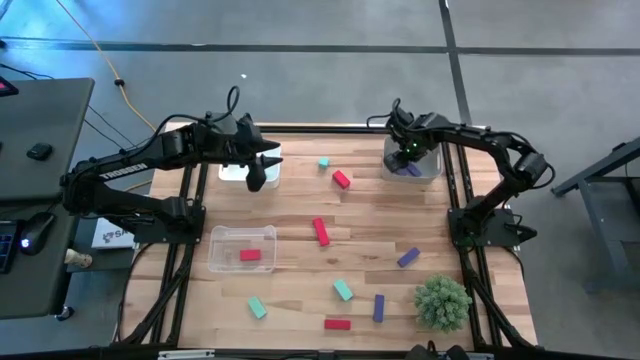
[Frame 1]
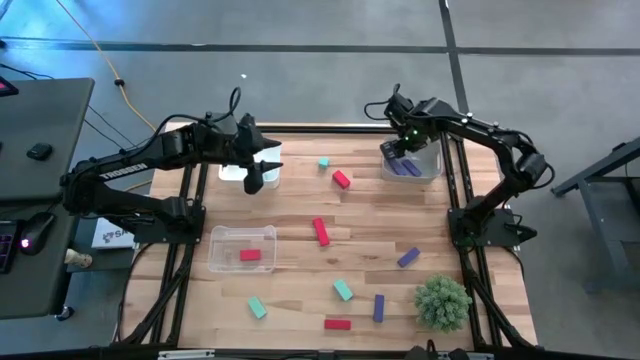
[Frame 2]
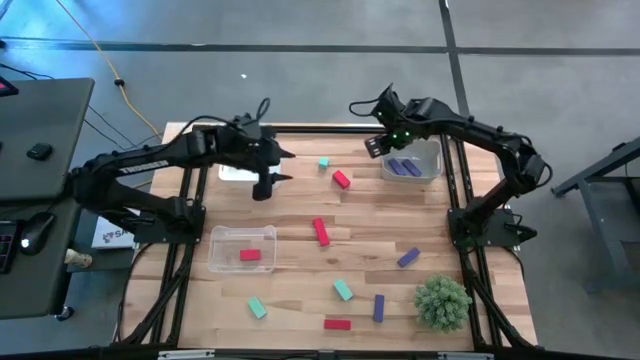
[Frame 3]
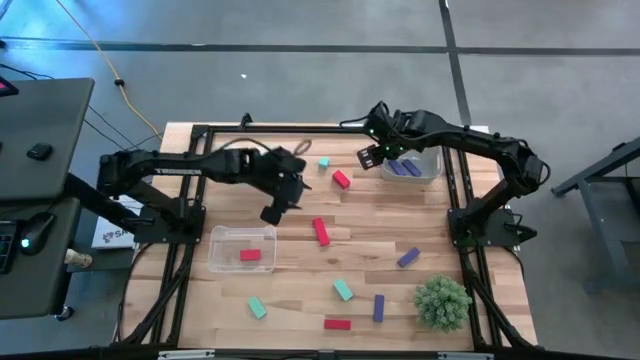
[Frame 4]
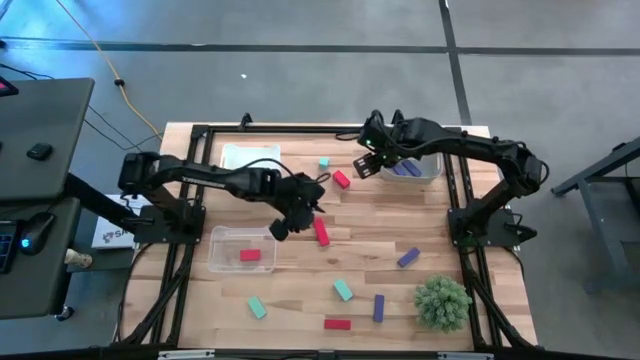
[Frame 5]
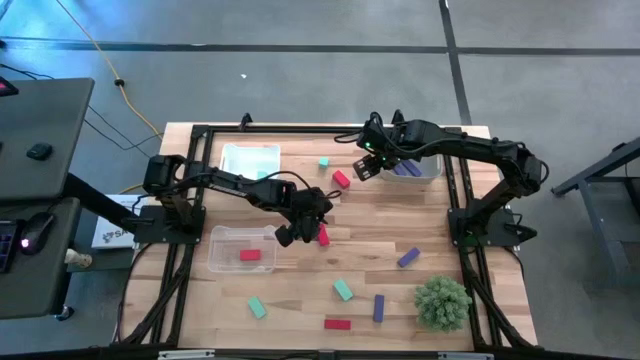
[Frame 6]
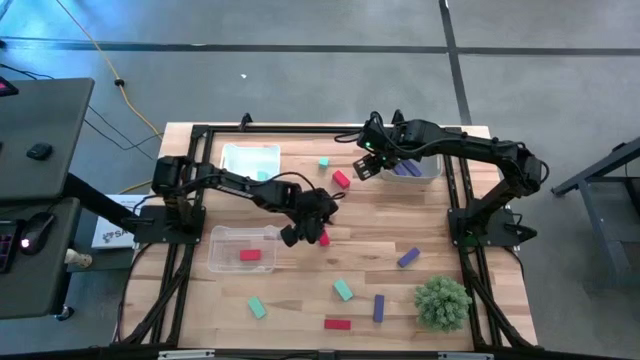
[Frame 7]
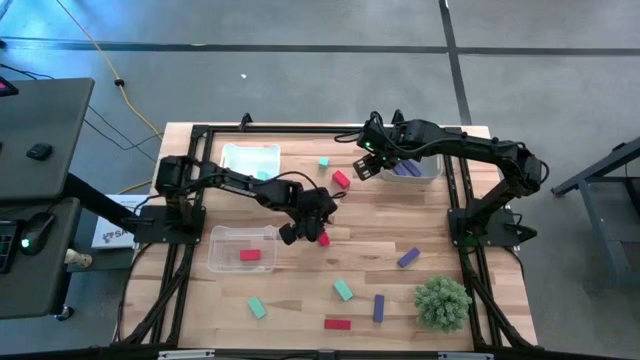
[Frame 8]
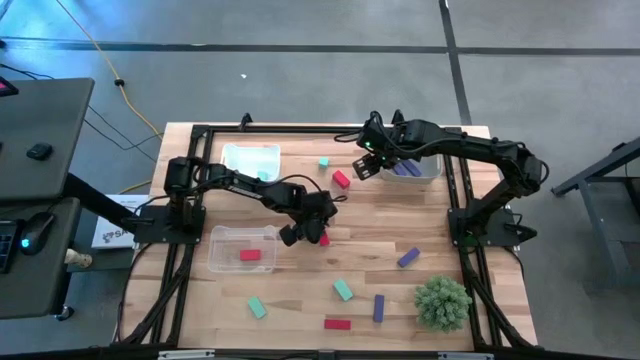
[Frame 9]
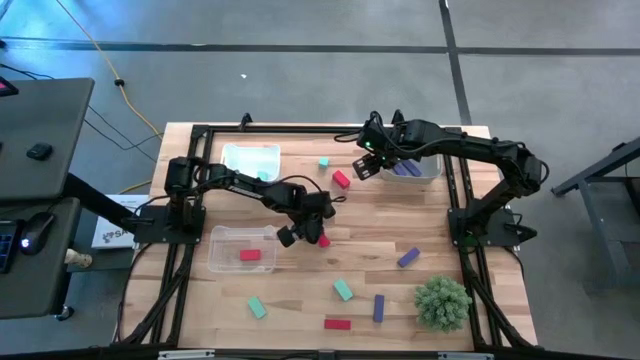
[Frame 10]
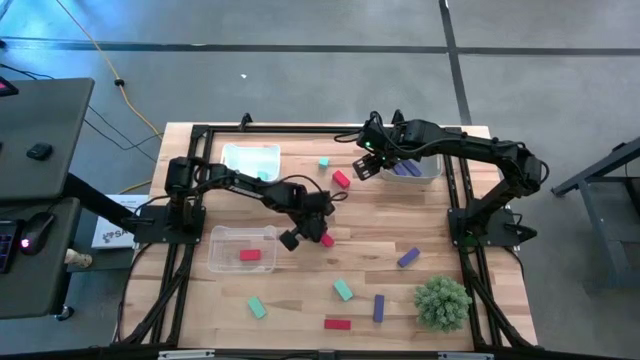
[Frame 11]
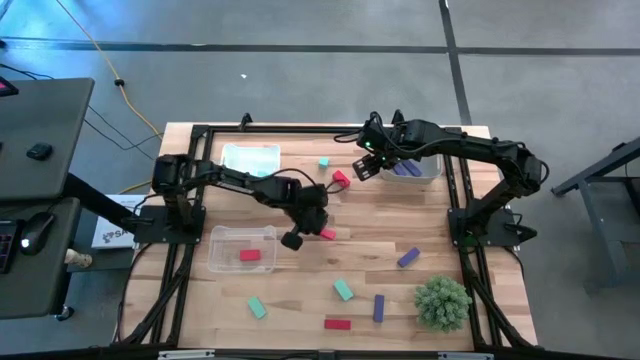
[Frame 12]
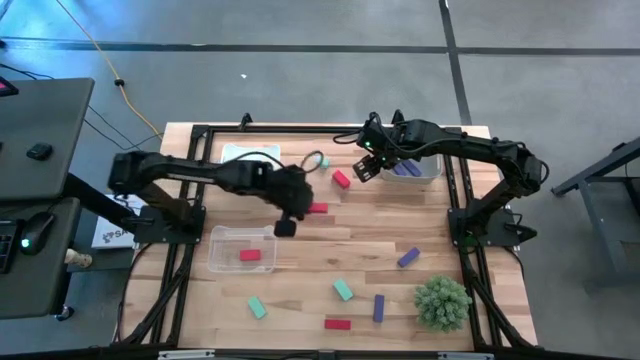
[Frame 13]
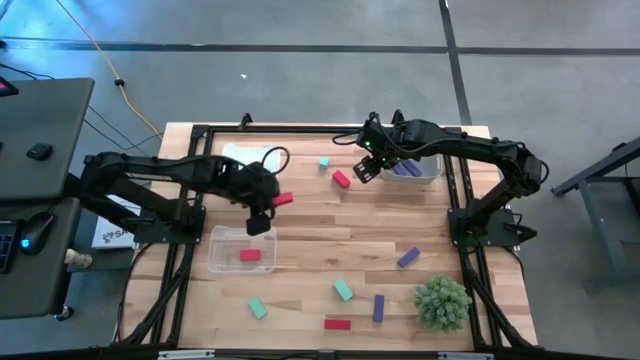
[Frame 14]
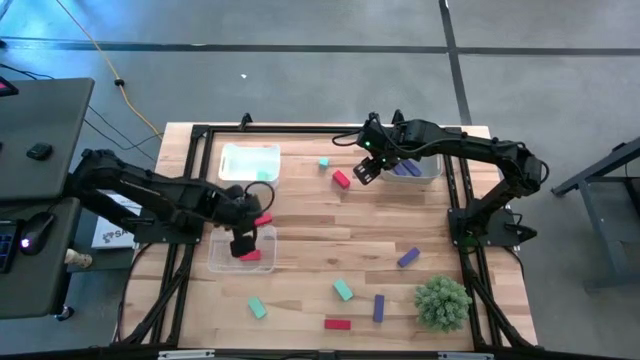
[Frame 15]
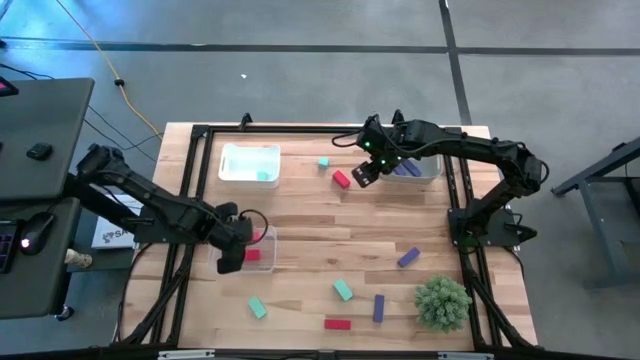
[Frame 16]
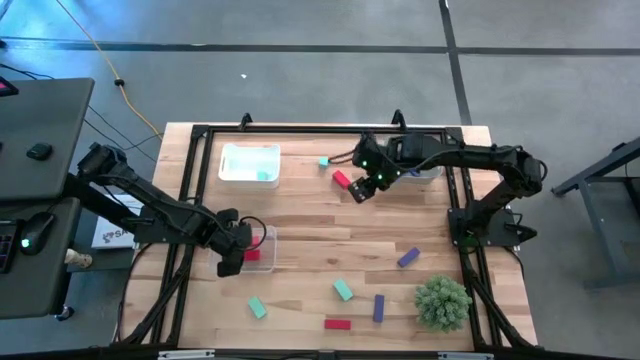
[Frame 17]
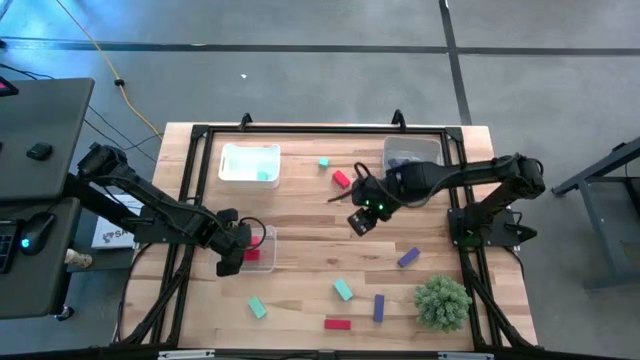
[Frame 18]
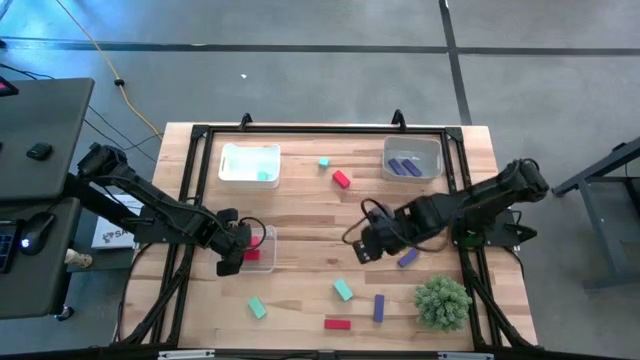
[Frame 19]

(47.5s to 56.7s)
Task: Sort & place blocks by color
Put the center red block into the transparent bin

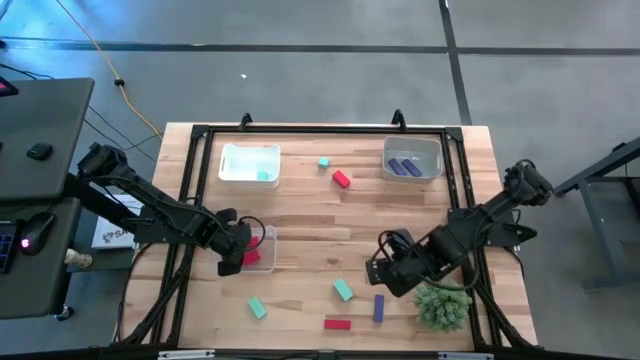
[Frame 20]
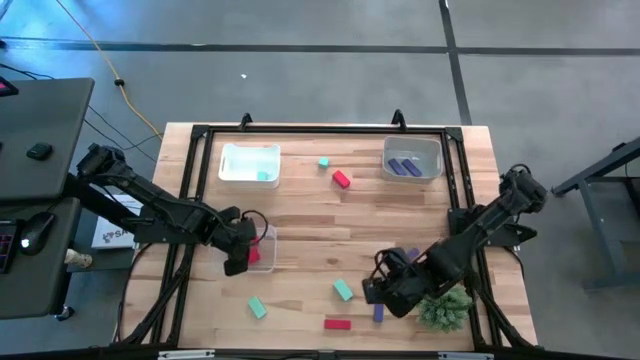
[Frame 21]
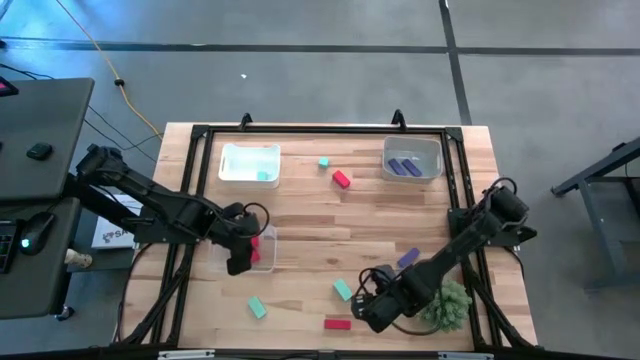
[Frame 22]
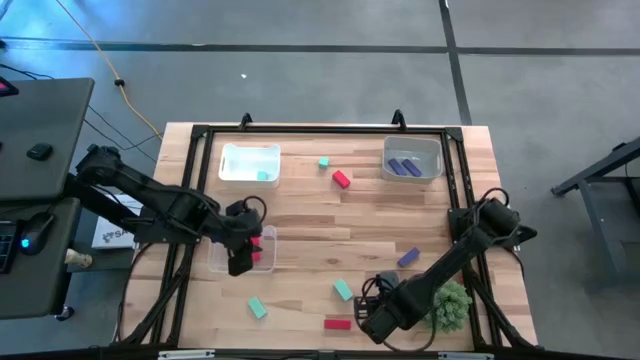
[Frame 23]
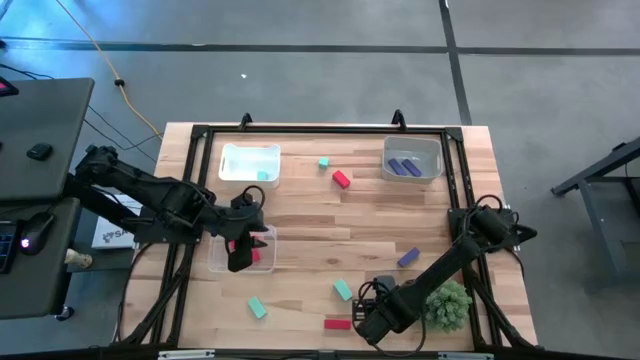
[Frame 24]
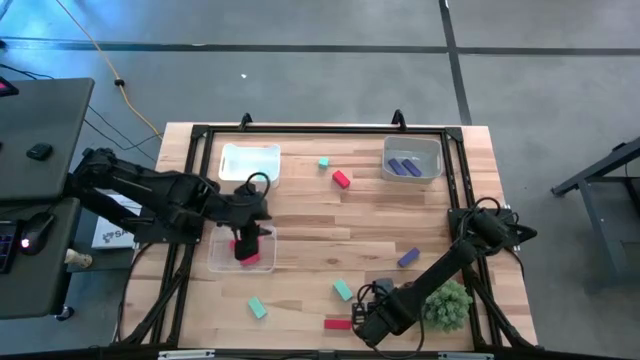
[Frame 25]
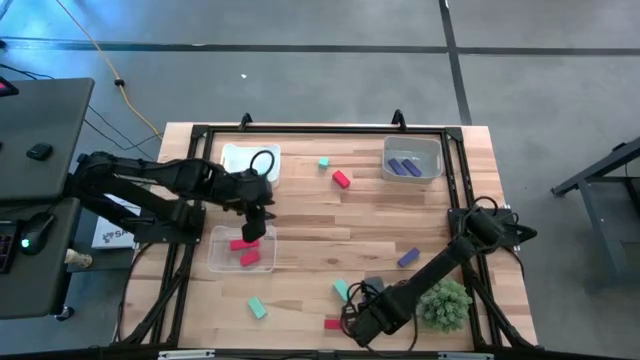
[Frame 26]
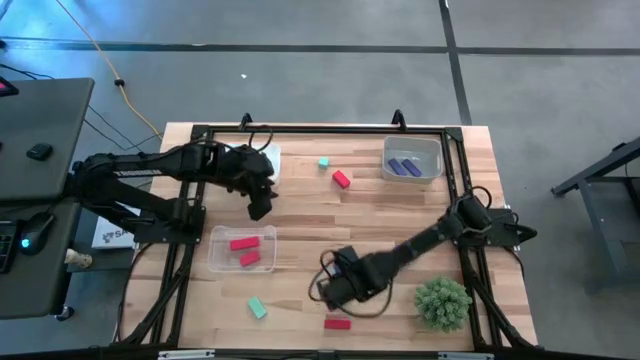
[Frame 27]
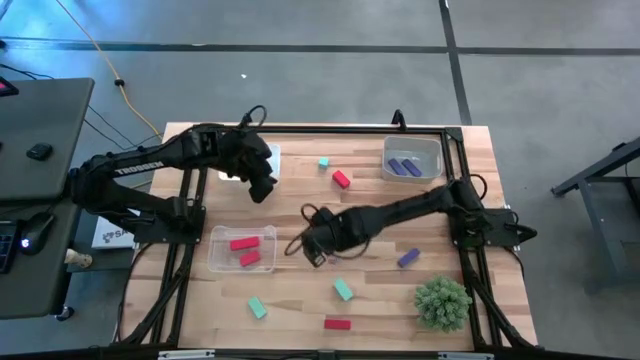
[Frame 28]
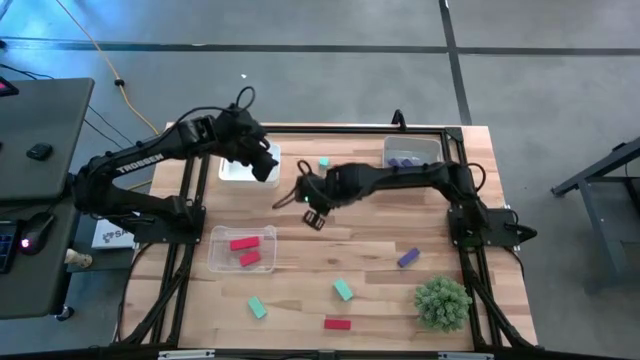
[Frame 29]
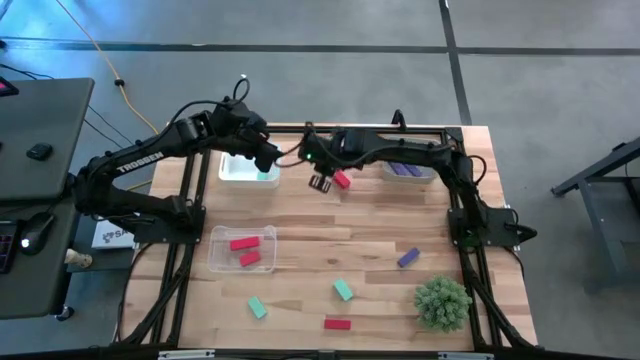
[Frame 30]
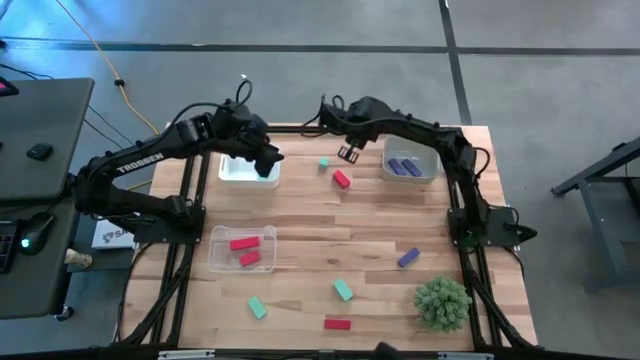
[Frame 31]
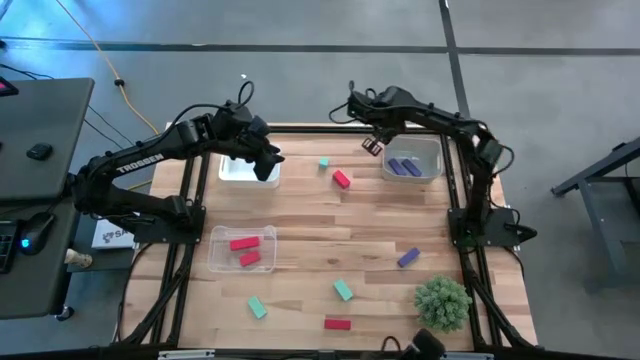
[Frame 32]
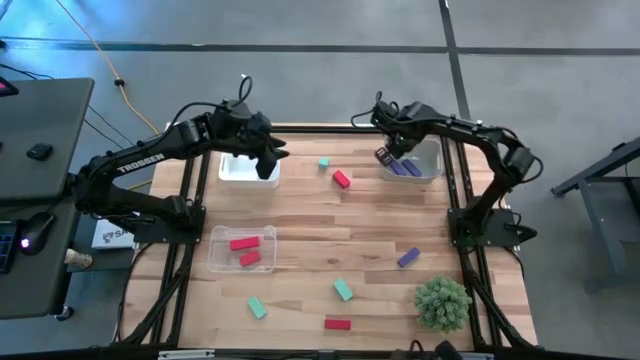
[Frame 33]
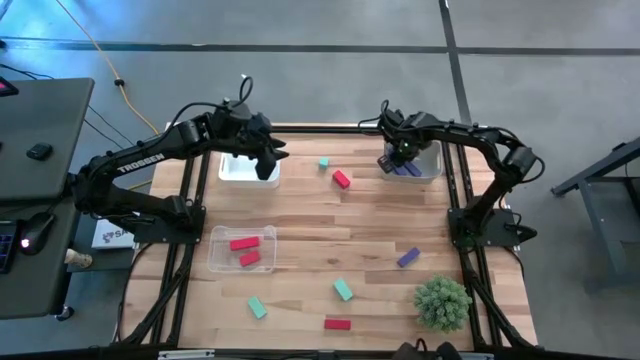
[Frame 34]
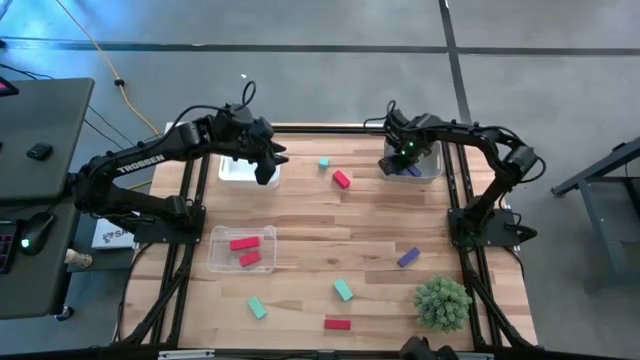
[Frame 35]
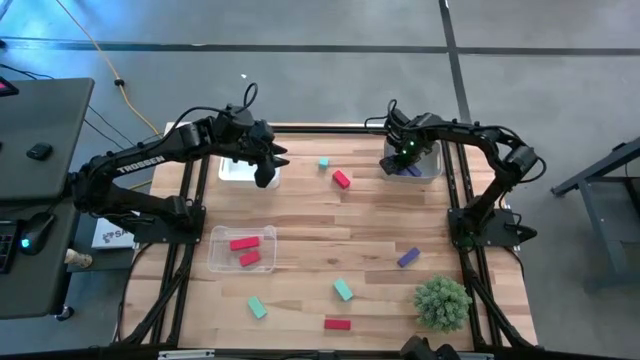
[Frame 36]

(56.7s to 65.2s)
Put the bottom violet block into the gray bin

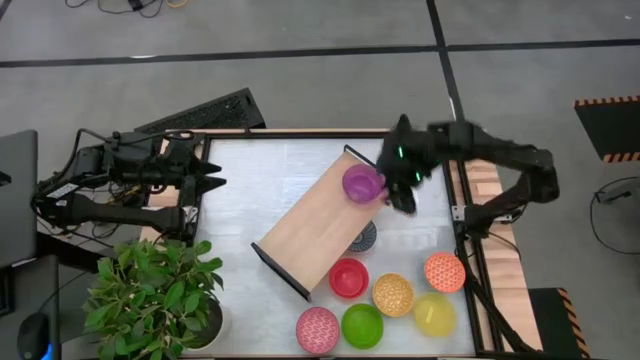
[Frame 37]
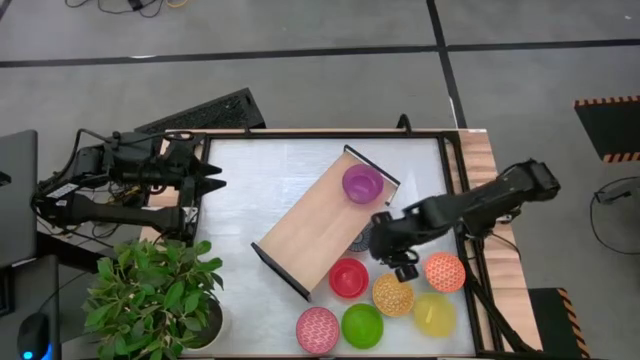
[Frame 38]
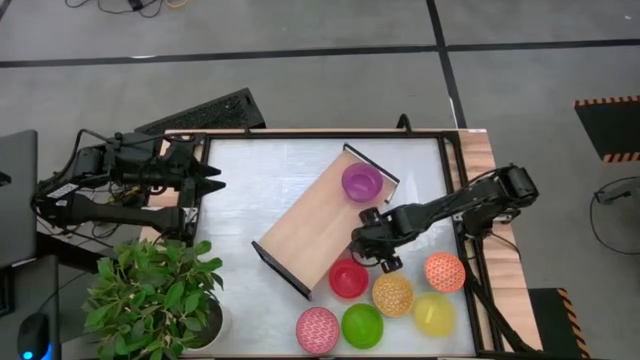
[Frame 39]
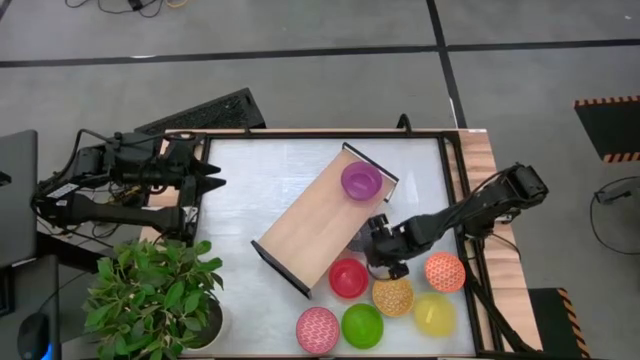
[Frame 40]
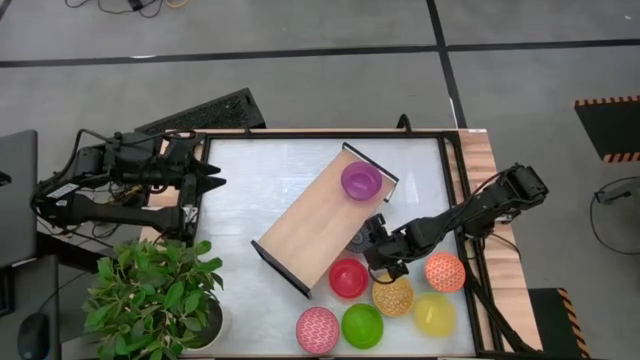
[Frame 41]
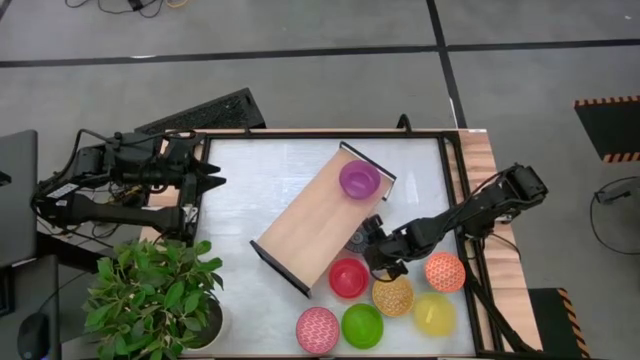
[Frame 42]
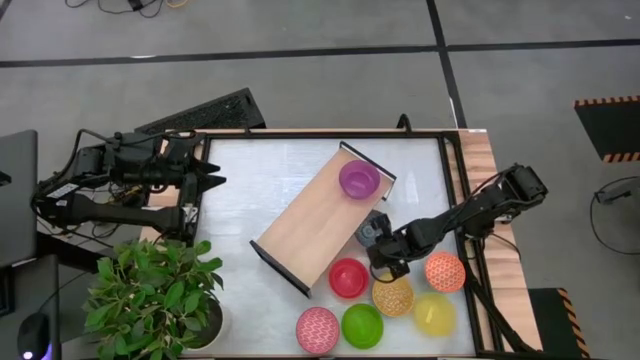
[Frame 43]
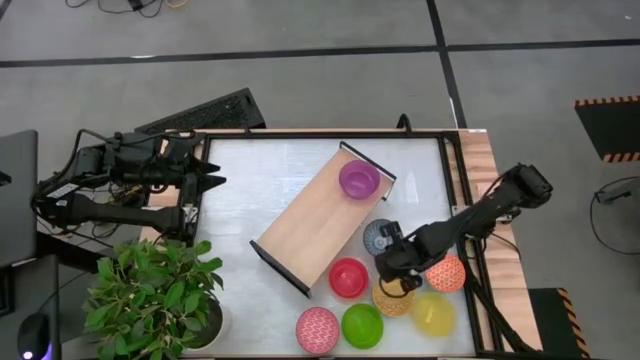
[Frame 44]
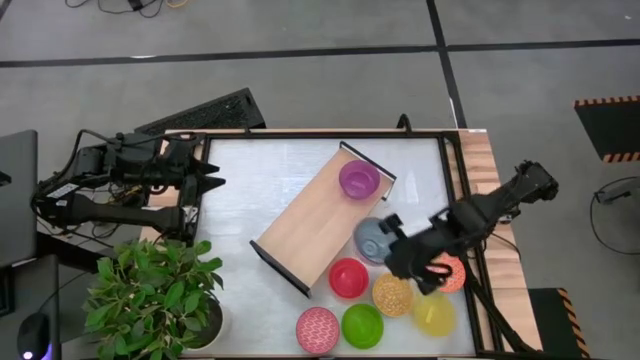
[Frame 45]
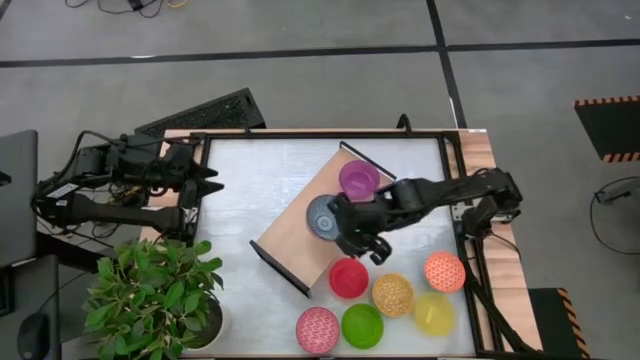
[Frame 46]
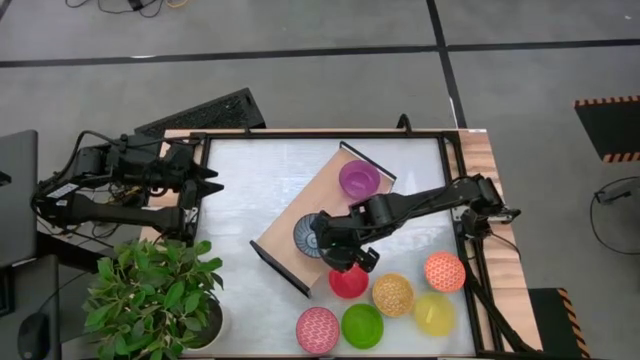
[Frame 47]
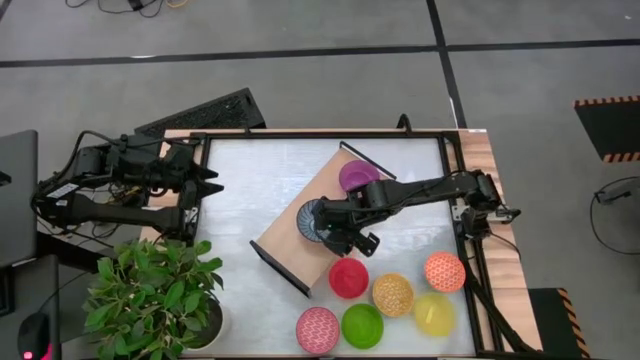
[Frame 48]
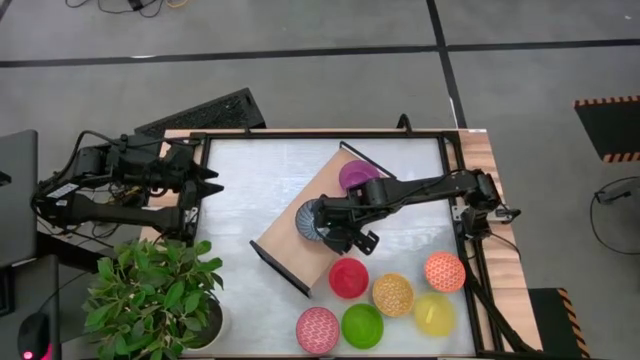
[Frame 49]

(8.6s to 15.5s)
Task: Place and stack bowls onto a shelf
Put the blue patterned bowl on the shelf
